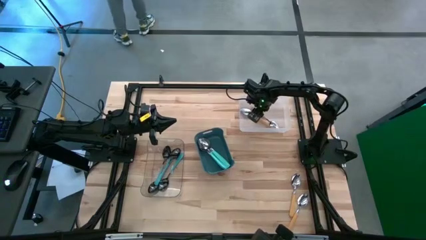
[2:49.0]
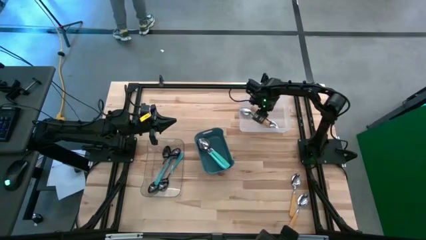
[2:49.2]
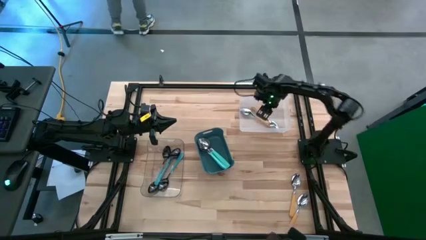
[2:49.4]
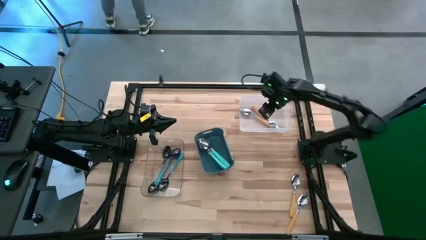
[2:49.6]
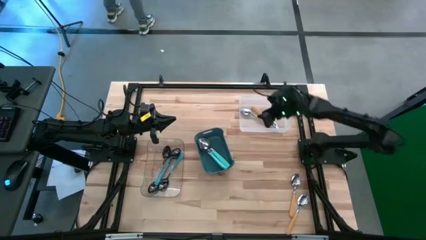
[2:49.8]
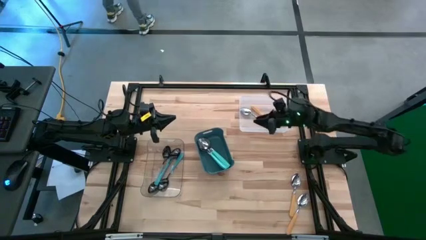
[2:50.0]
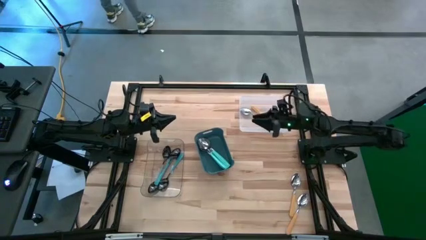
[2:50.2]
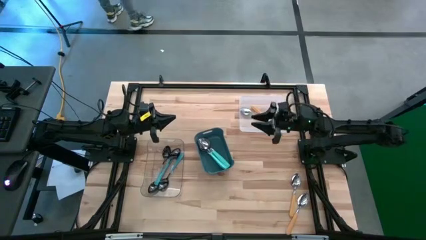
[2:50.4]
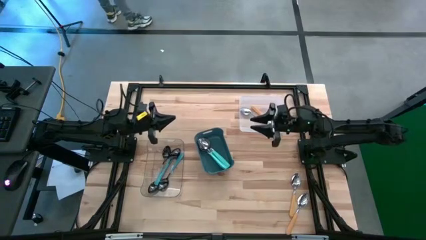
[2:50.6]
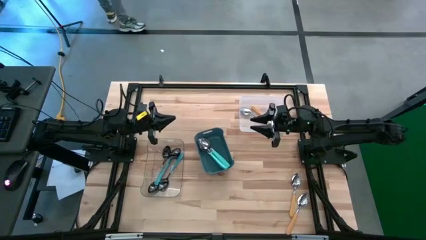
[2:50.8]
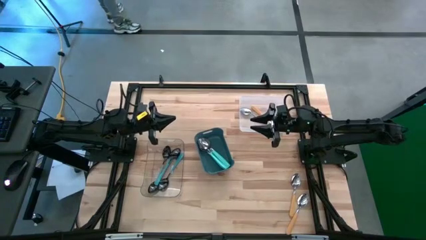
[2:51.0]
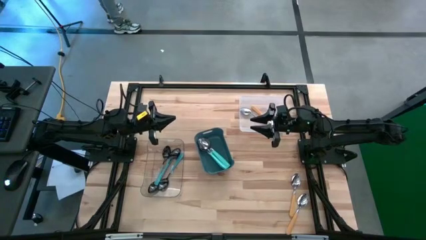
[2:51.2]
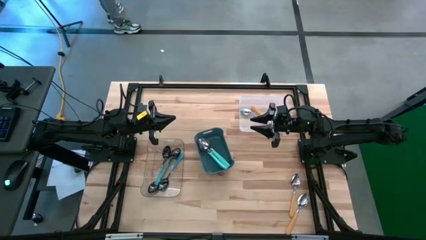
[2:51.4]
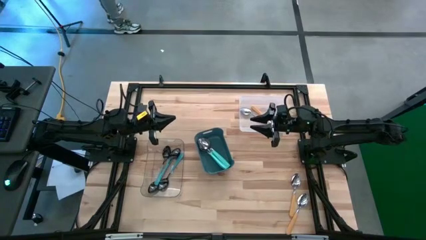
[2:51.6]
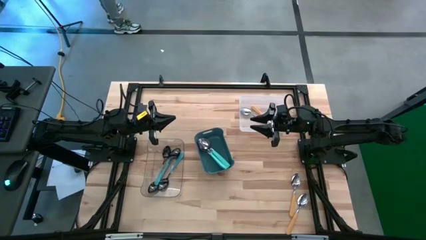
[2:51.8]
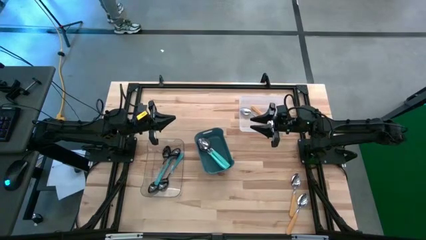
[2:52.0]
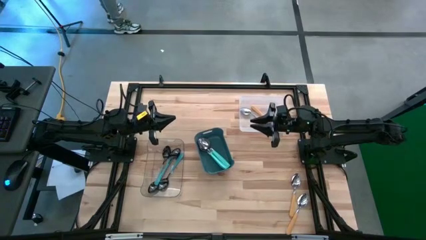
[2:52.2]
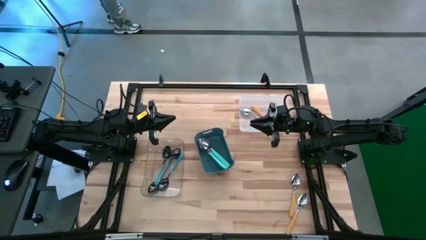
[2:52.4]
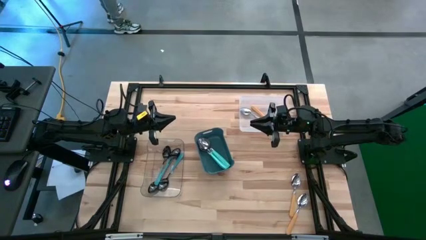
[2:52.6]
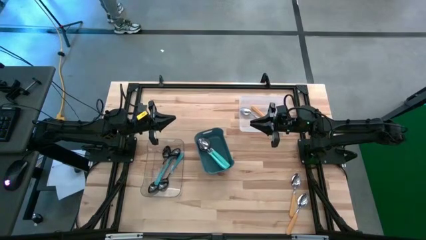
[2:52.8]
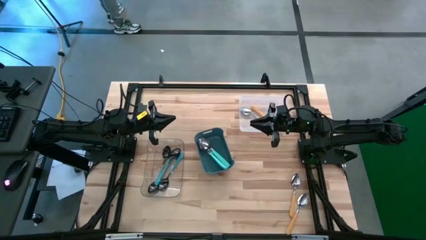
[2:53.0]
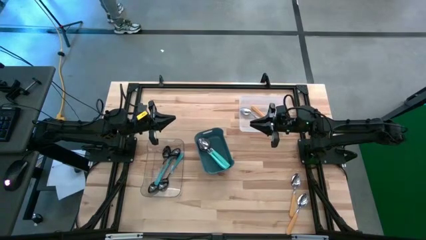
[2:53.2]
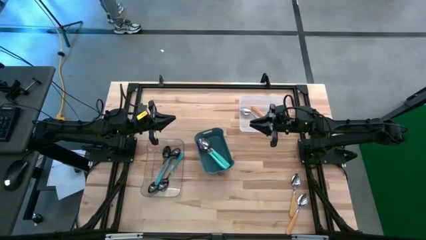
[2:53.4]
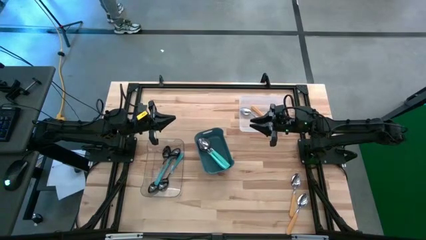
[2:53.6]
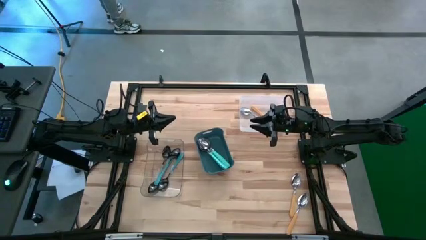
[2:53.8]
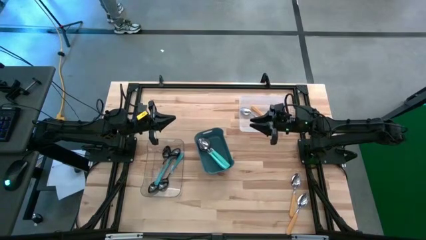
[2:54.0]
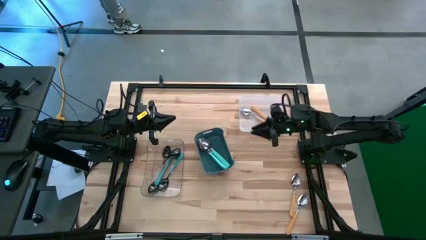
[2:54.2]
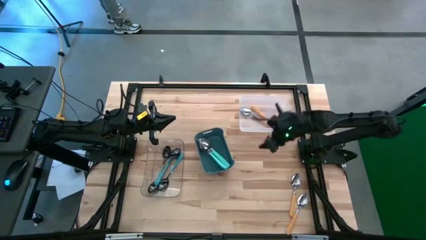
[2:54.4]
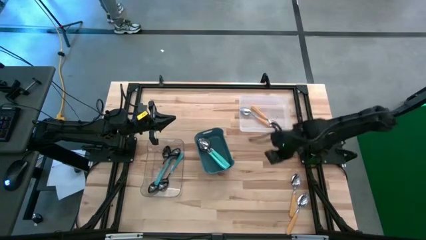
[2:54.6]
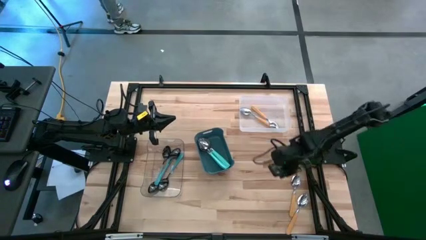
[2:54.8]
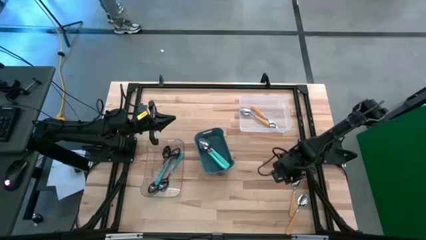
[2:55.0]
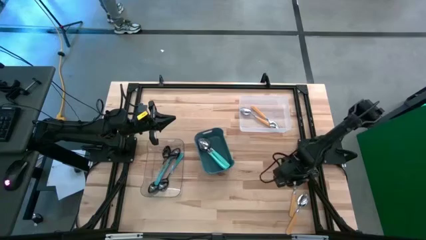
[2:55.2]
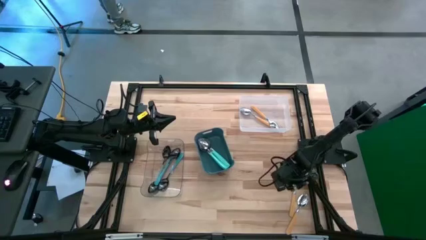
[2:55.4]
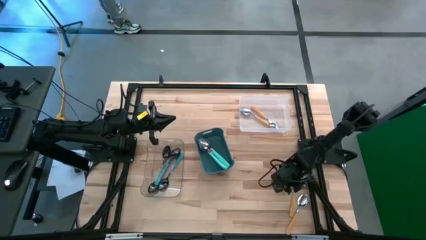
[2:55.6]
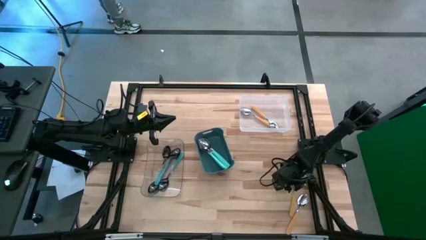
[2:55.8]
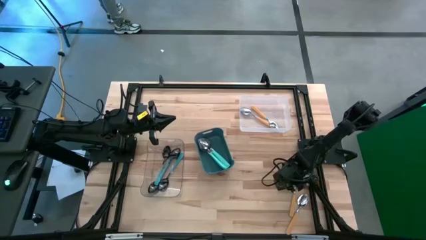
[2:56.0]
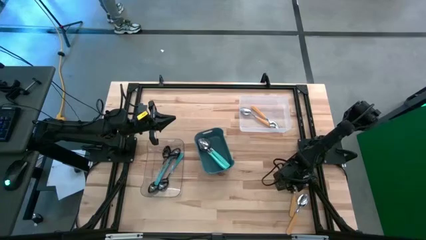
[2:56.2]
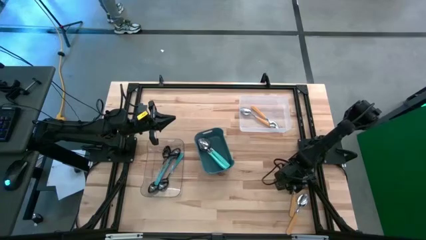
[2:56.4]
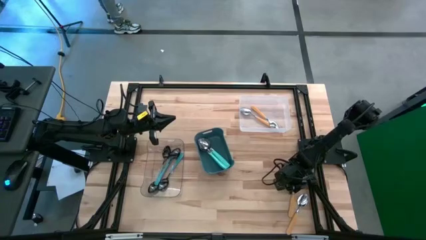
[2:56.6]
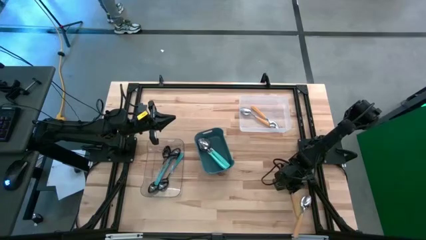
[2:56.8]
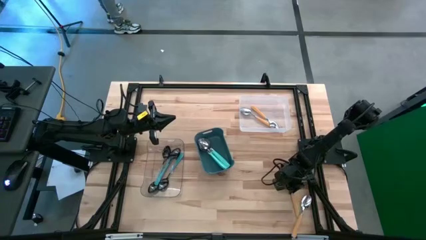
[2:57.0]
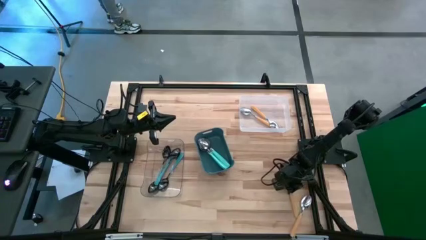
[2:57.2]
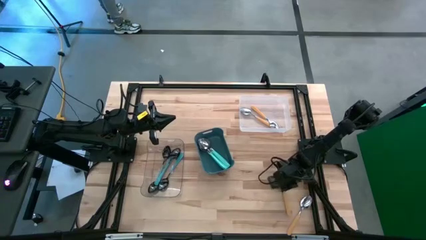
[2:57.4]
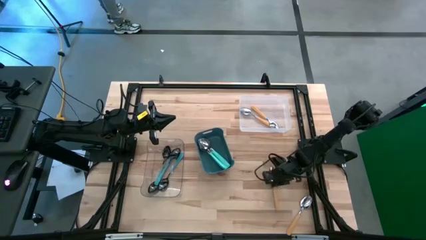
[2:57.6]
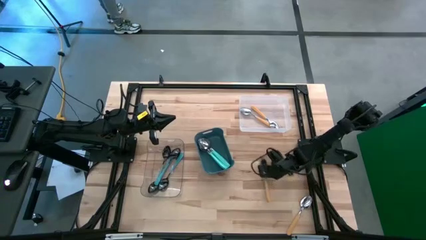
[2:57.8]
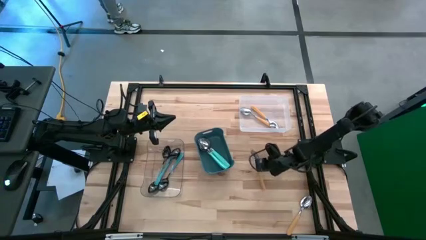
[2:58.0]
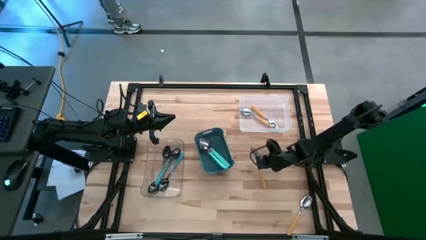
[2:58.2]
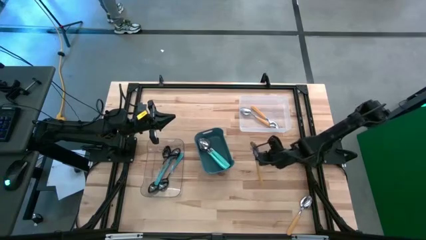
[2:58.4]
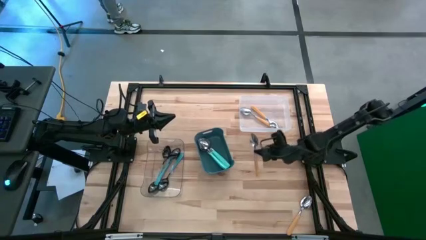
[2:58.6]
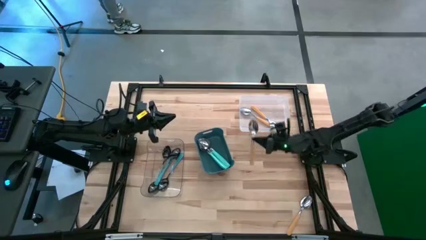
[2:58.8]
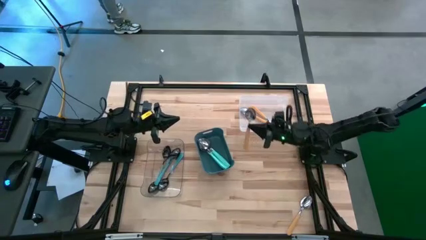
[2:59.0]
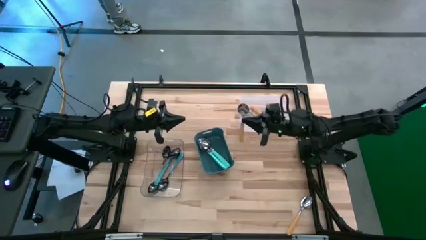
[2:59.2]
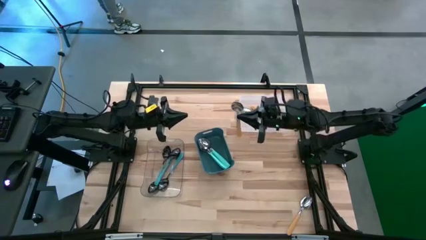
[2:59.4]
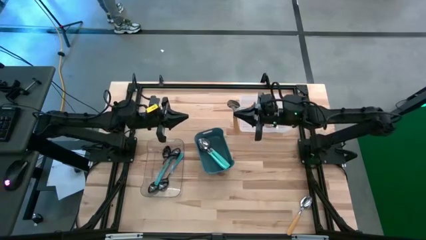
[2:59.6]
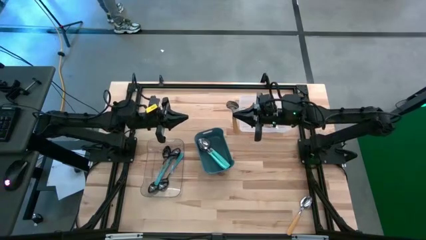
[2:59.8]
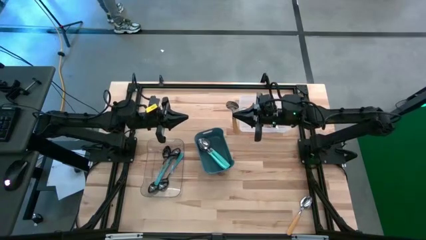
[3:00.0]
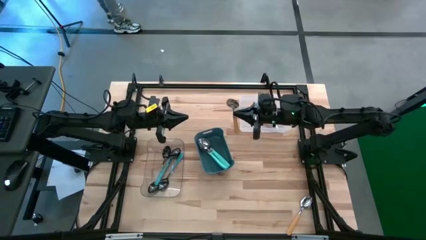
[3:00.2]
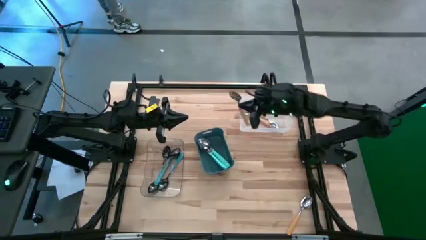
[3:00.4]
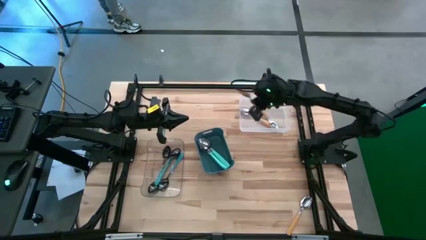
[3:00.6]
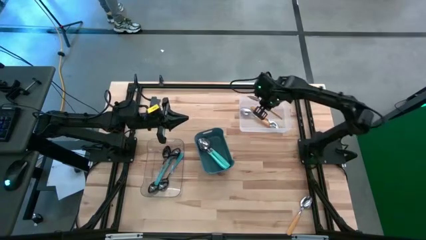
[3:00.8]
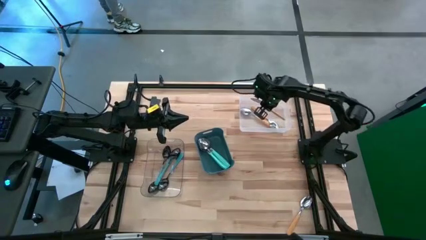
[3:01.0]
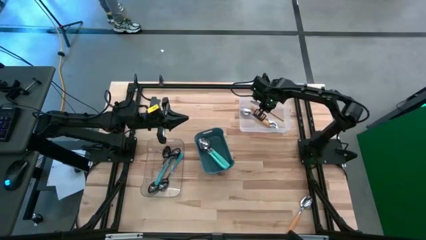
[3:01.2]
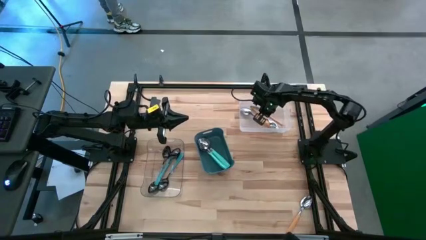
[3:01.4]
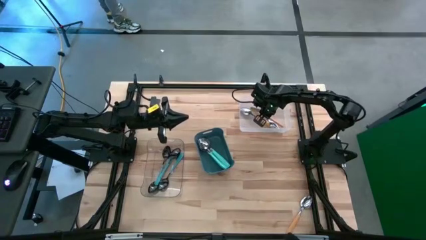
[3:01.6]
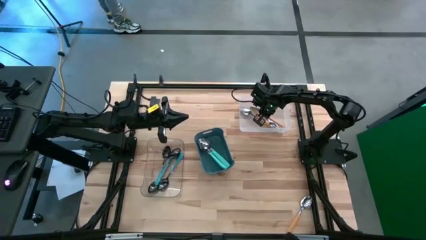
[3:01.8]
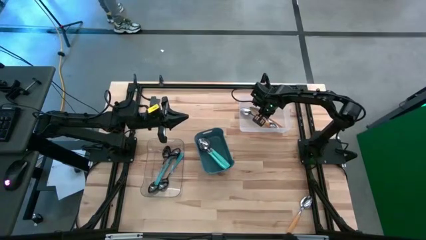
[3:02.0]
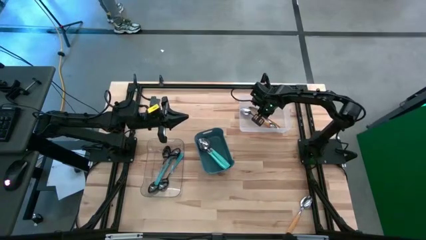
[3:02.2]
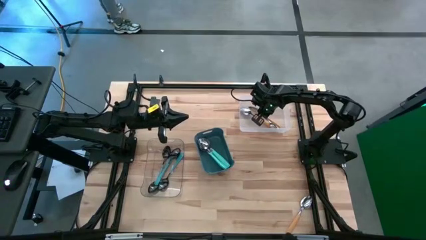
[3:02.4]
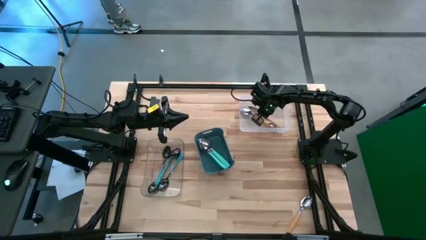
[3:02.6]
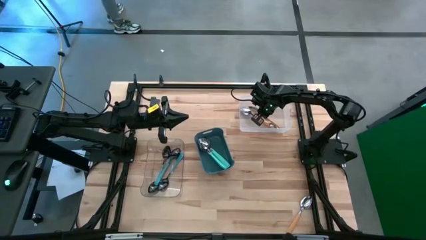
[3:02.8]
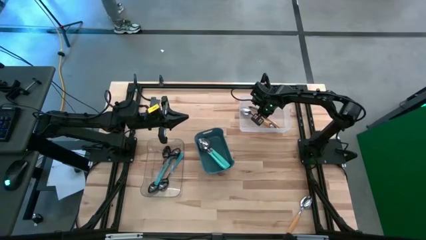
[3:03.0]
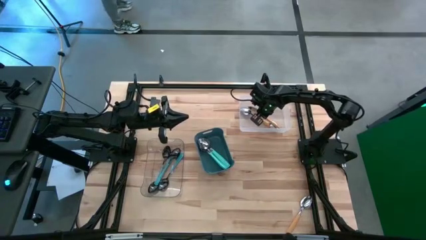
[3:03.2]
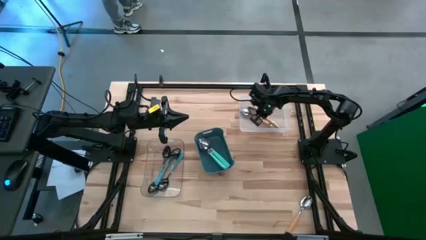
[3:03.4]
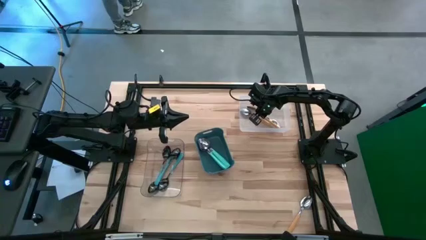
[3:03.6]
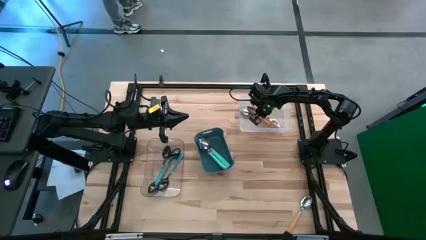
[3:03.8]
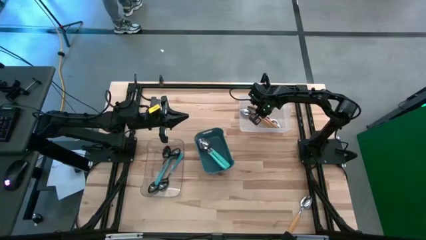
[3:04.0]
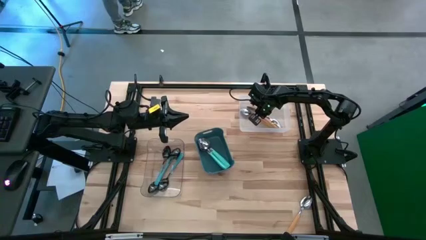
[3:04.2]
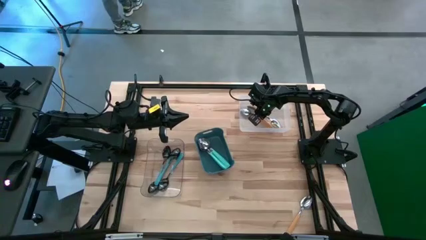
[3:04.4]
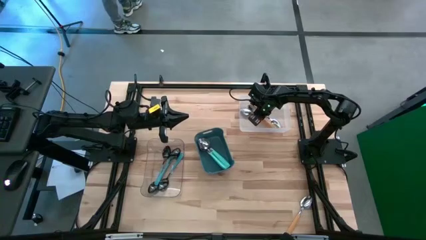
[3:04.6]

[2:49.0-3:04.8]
Task: Sort silverware by color (type)
Put the orange spoon into the white bin

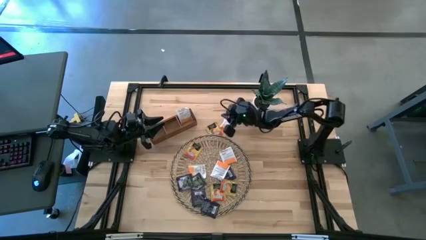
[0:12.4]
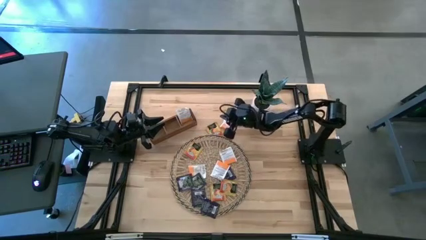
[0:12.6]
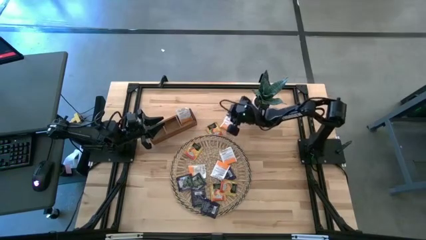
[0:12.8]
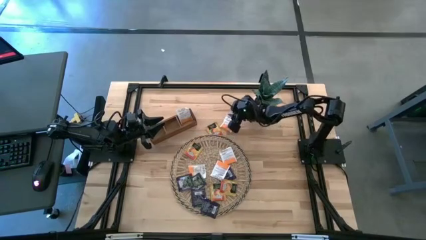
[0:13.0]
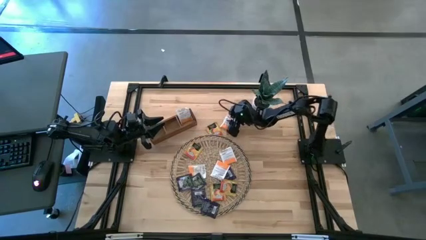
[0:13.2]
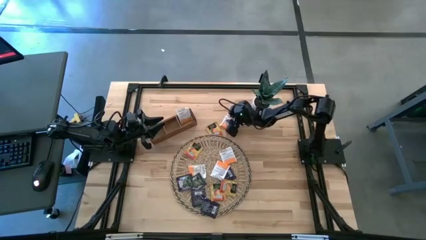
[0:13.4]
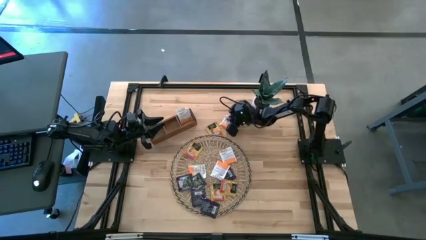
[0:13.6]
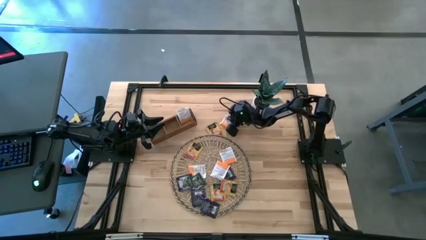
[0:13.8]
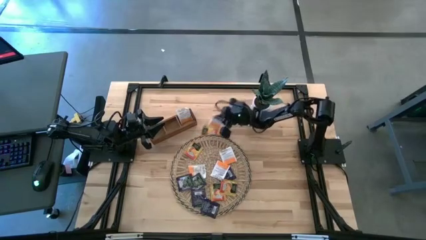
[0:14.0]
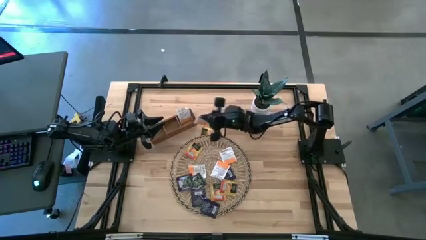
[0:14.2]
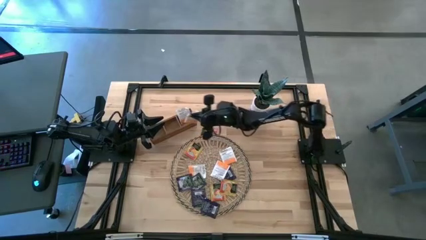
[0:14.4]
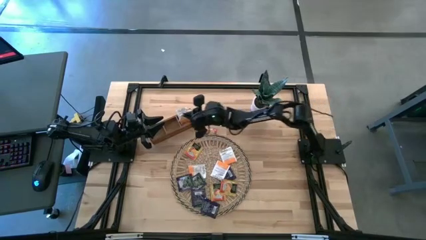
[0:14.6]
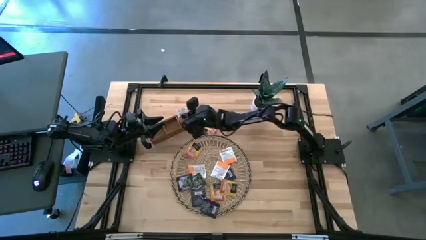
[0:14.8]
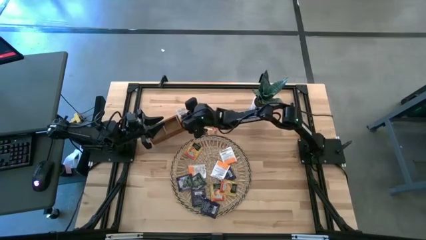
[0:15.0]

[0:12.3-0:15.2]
Task: Pick & Place Tea
Put the white tea bag into the right compartment of the wooden organizer
